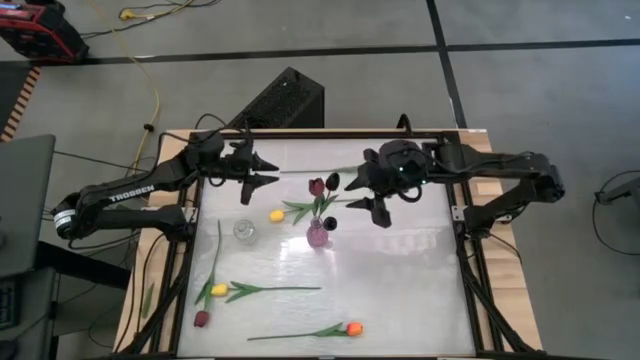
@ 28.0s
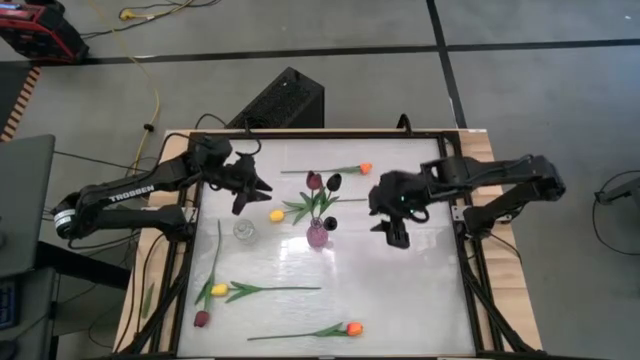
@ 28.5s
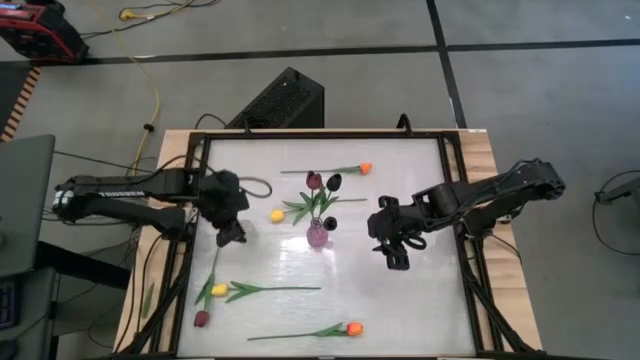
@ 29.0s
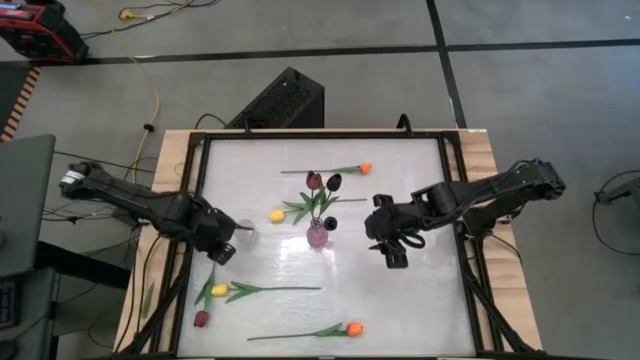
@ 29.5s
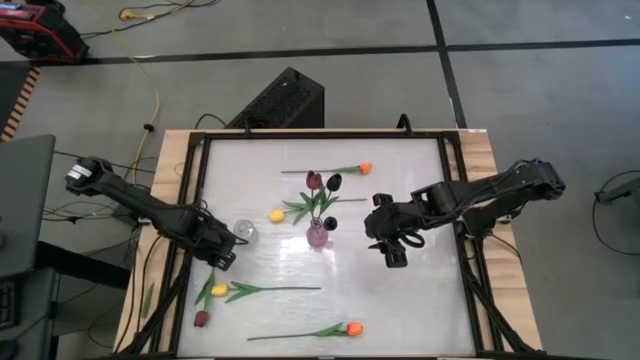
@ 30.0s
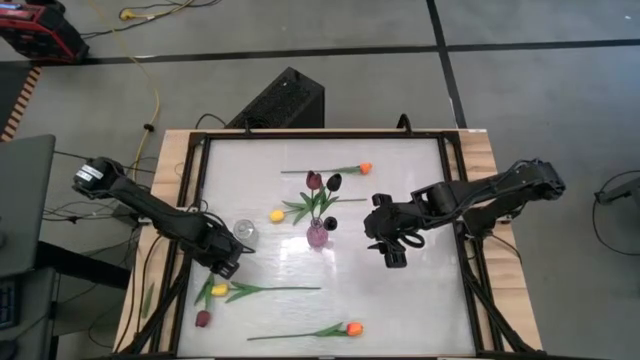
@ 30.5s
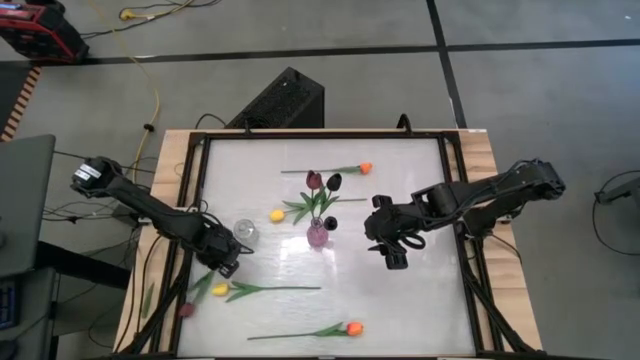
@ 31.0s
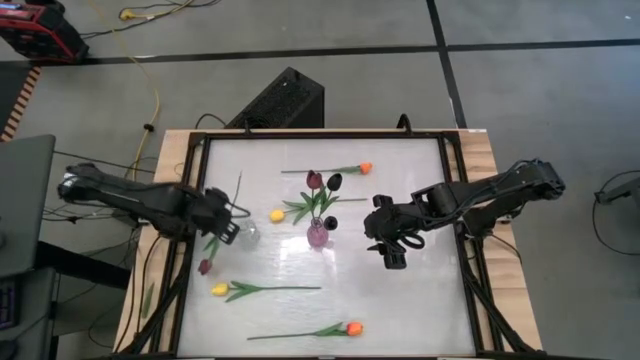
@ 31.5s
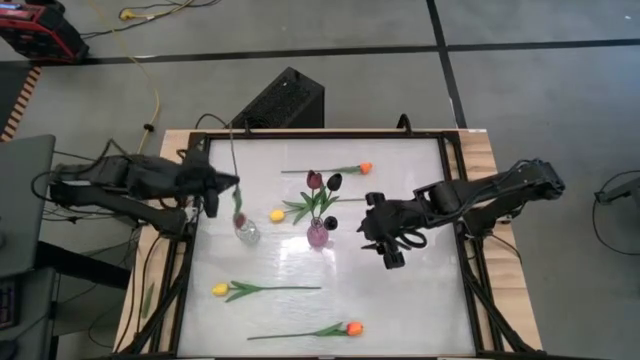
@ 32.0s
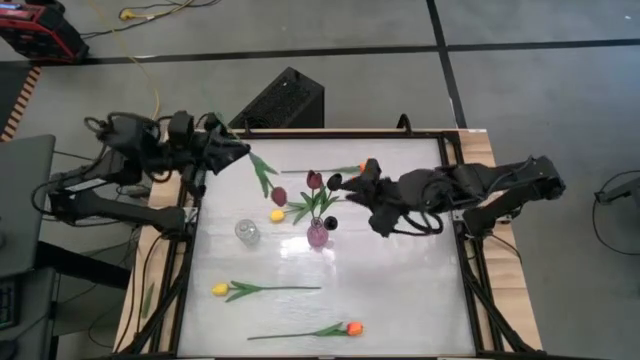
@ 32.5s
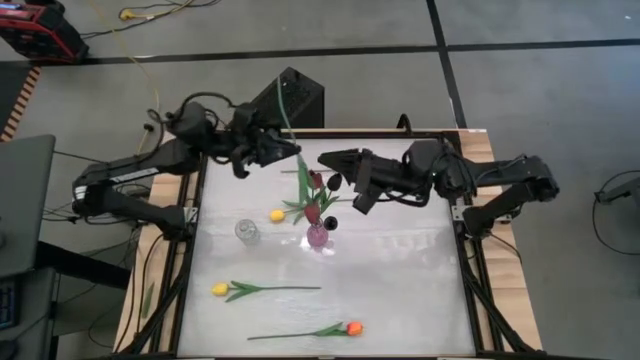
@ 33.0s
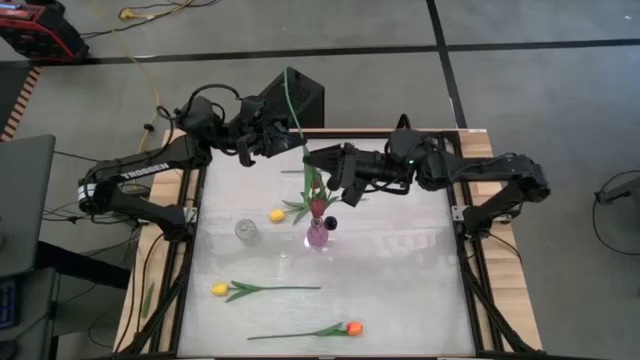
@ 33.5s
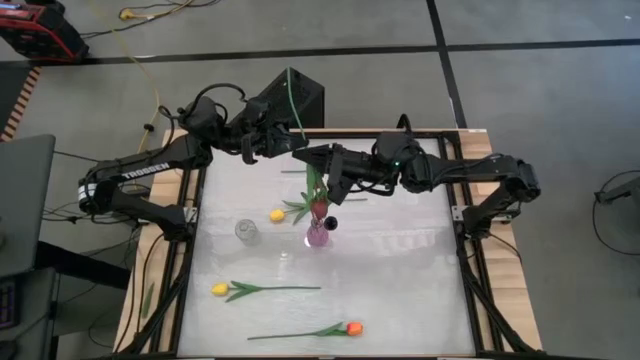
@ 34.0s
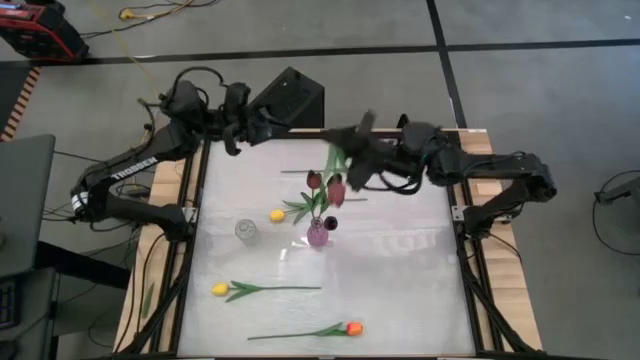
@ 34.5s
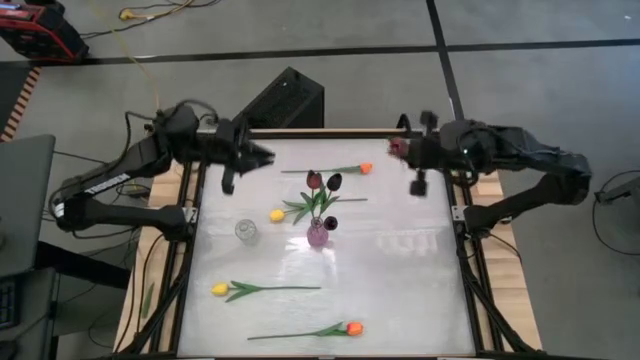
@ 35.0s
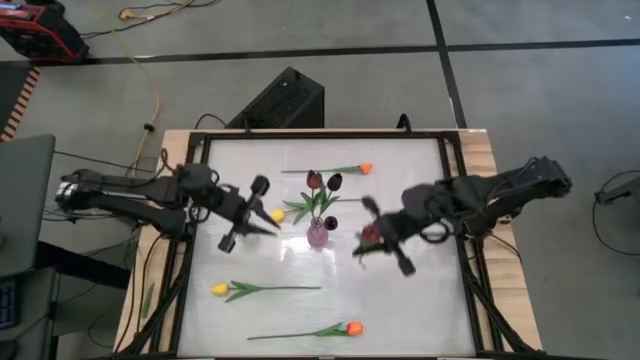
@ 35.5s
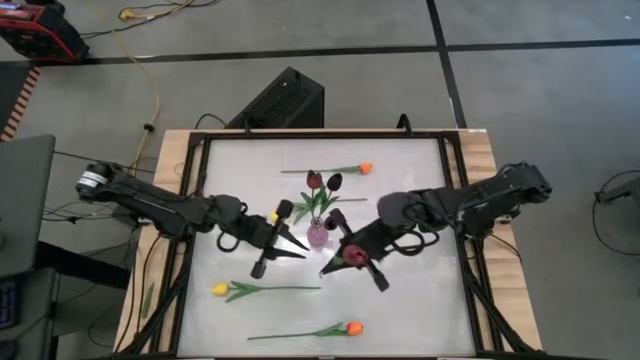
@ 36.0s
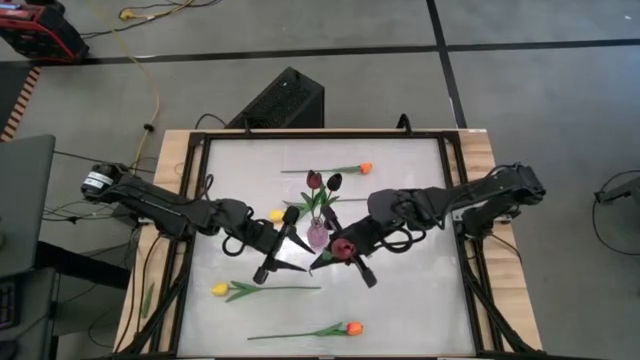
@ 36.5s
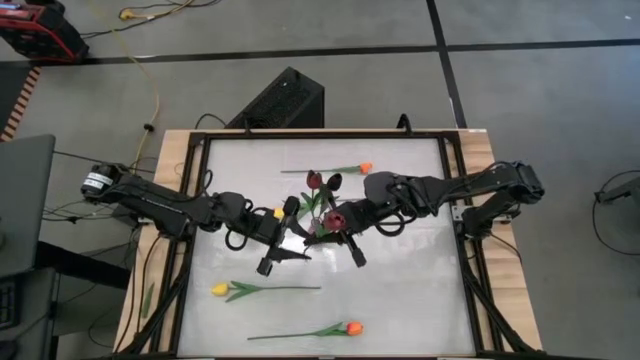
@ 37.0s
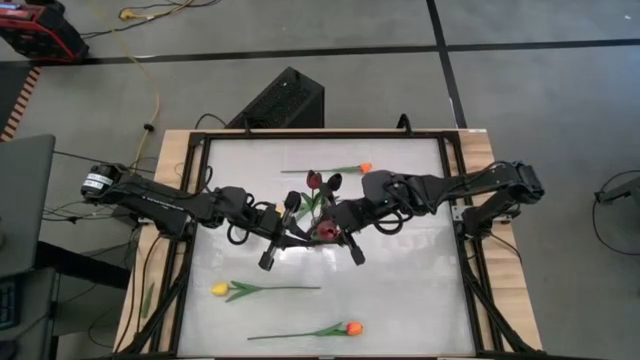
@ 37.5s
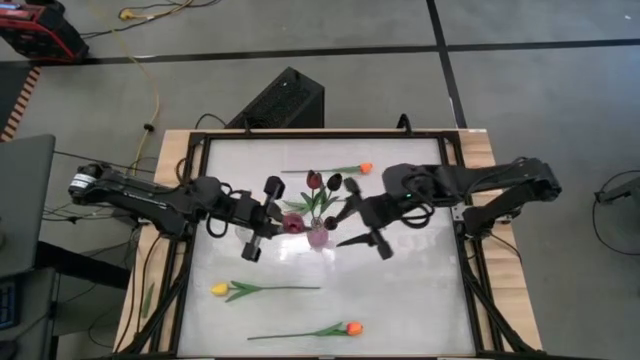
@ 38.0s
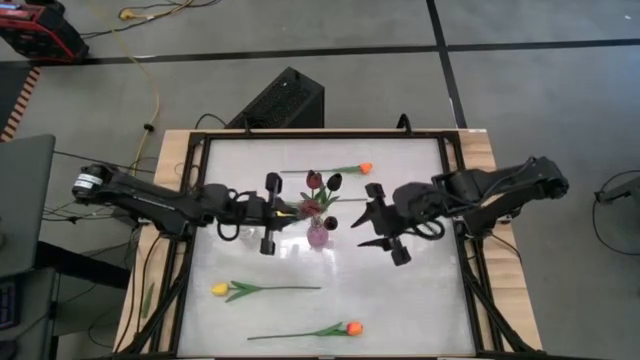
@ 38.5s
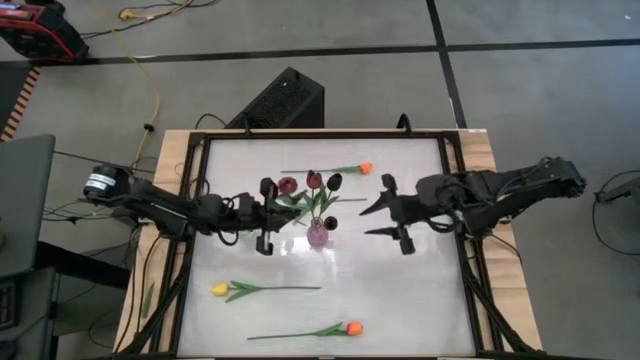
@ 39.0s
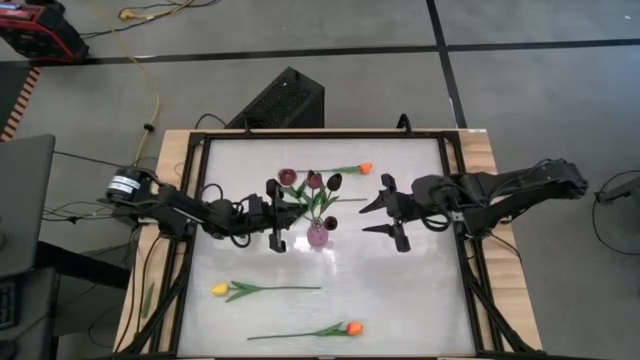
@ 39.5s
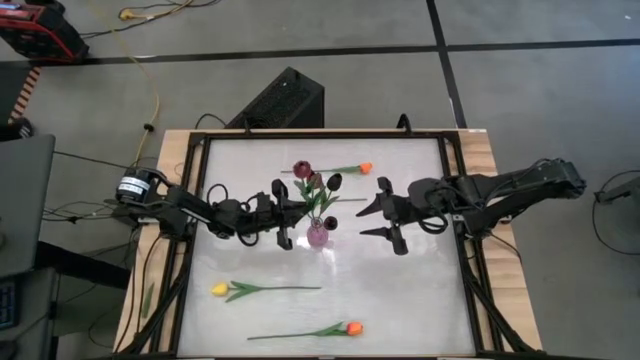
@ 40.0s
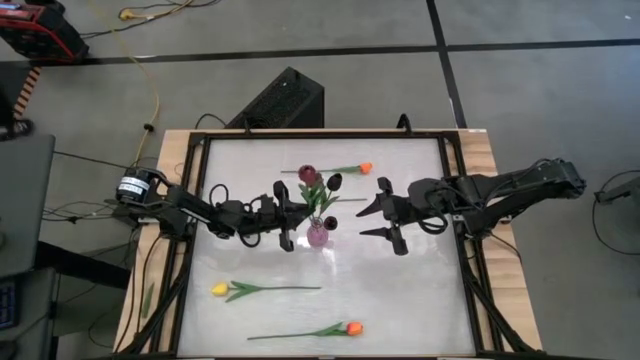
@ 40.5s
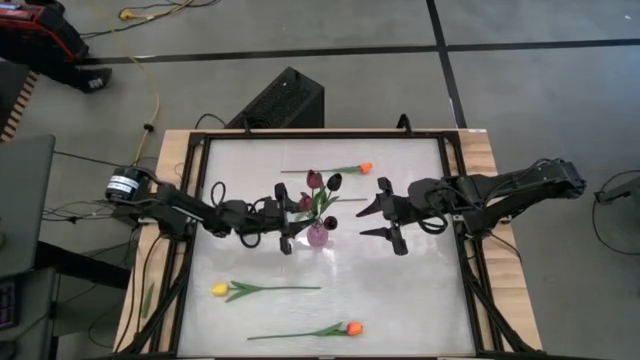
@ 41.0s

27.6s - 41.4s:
Task: Sort flowers into vase by color
Put the red flower into the violet vase

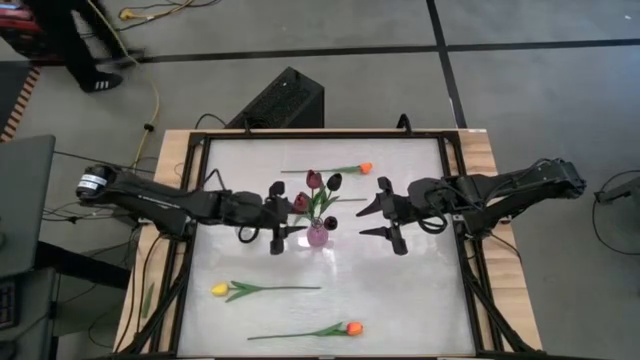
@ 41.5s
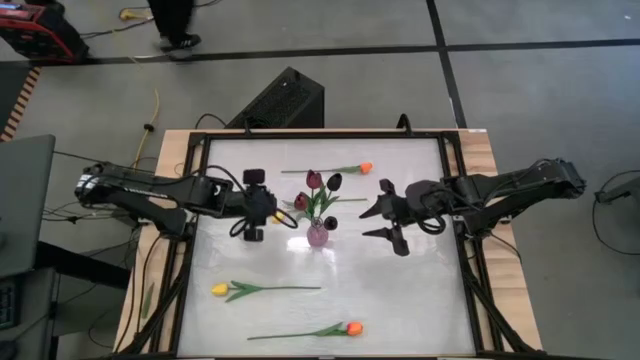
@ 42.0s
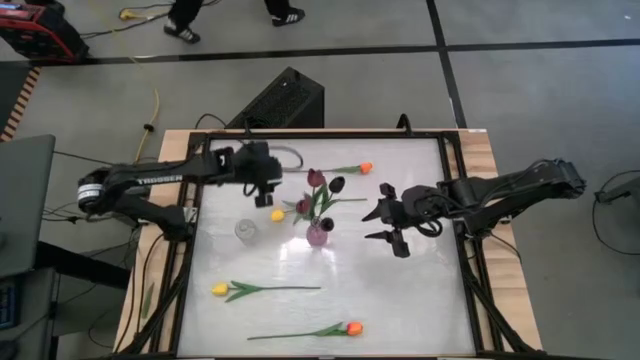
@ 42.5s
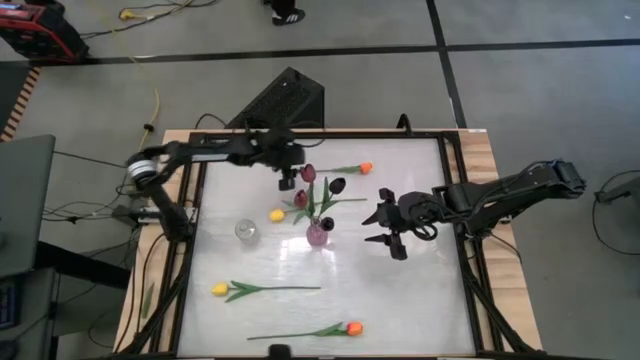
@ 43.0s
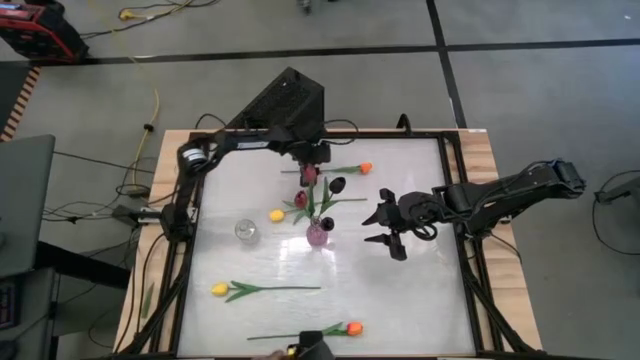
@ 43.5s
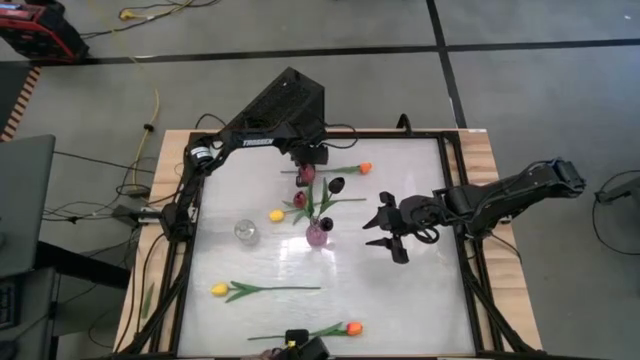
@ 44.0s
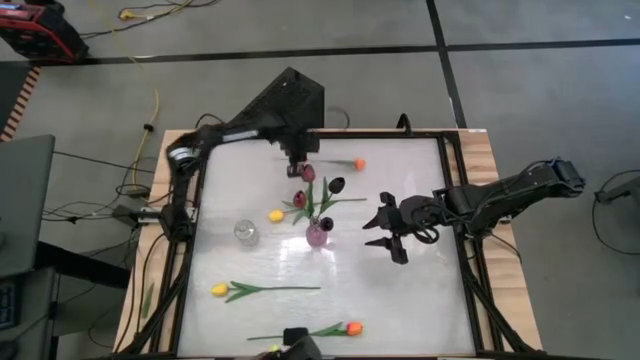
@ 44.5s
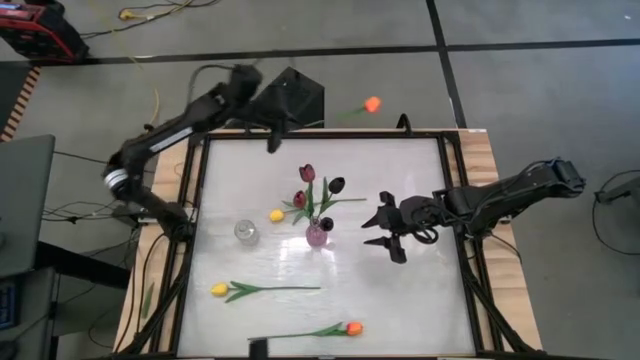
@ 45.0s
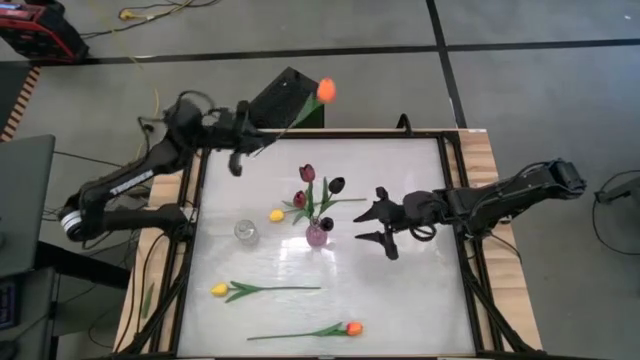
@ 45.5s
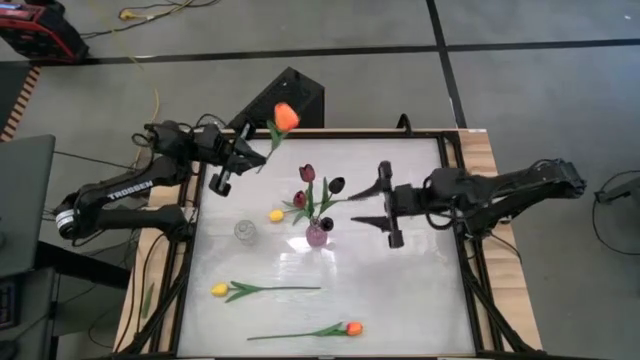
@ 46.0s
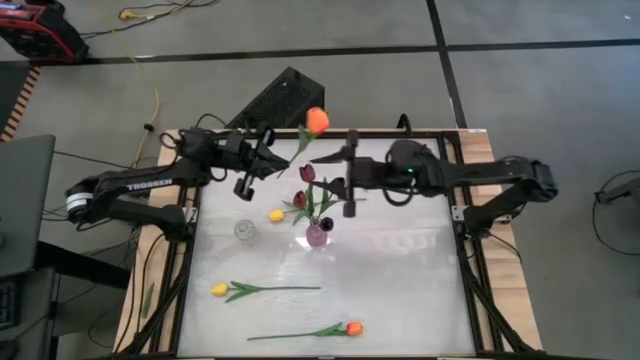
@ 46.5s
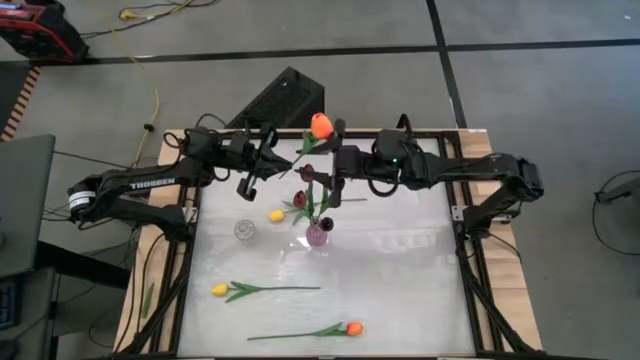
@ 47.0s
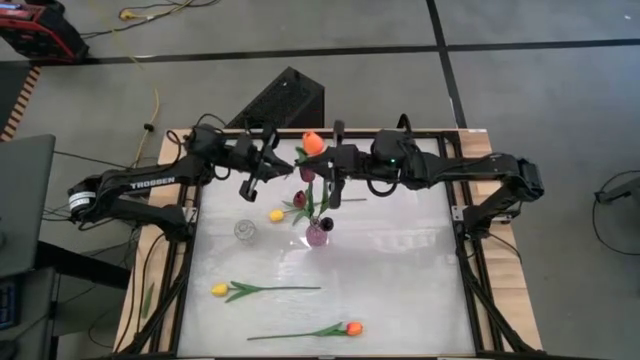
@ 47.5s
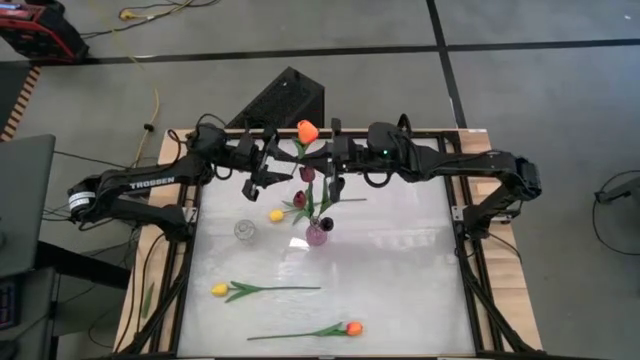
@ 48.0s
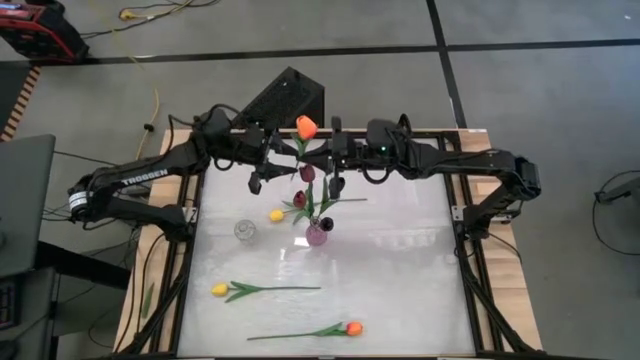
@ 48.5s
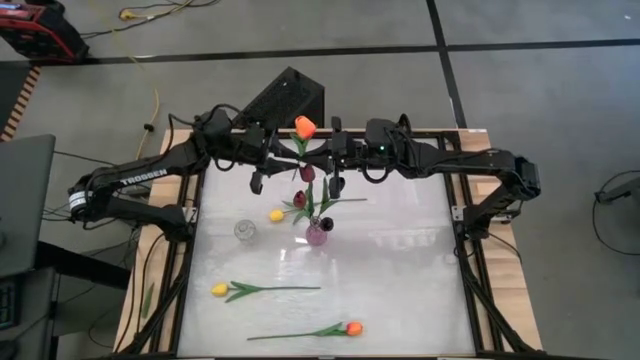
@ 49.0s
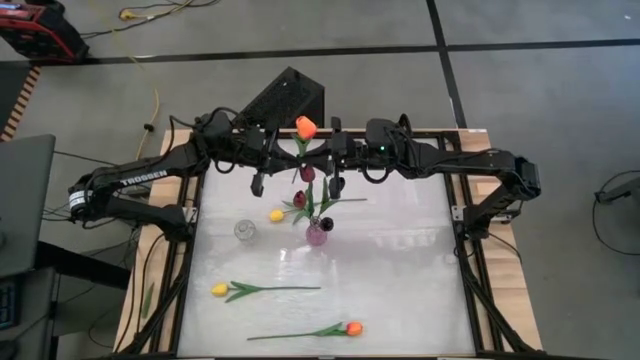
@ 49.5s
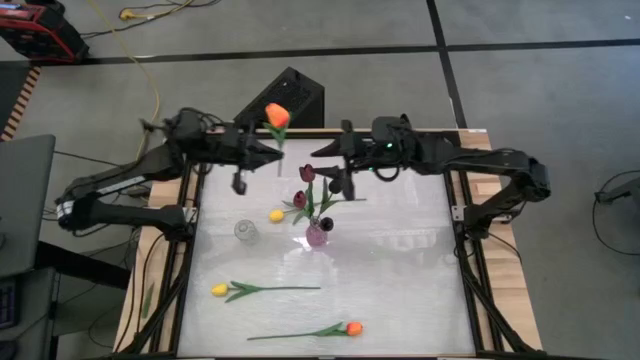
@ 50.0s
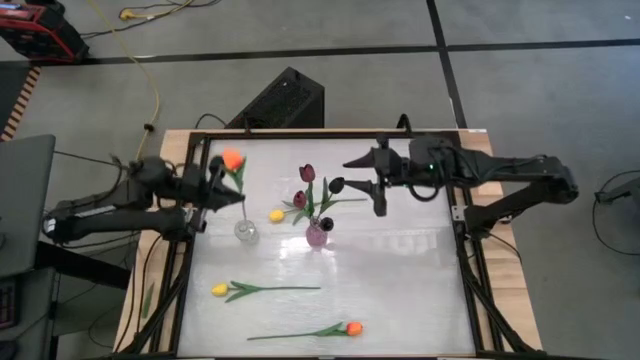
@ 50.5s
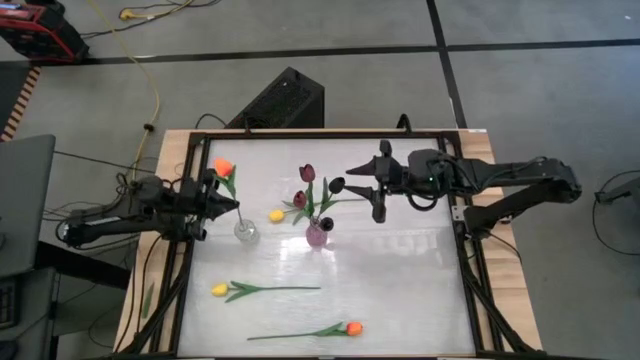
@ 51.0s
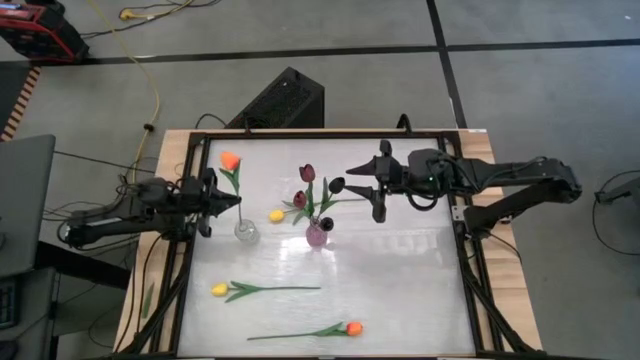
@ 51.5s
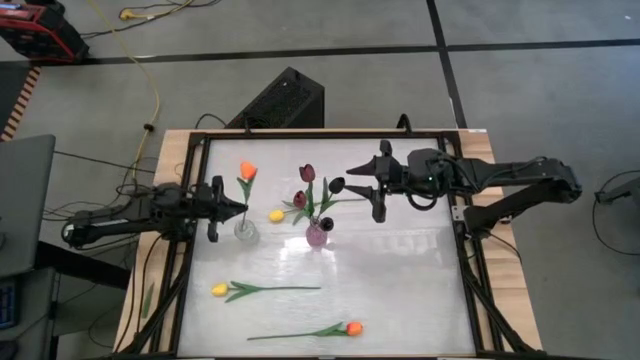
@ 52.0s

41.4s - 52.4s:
Put the top orange flower into the transparent vase
